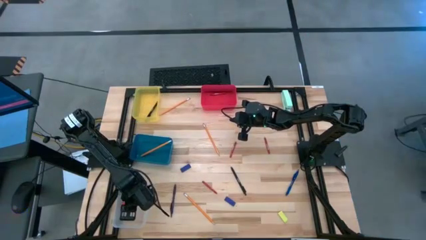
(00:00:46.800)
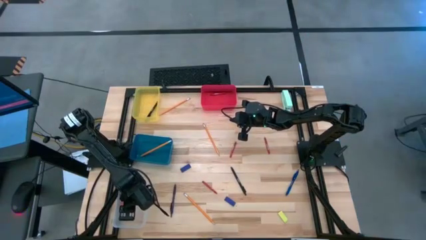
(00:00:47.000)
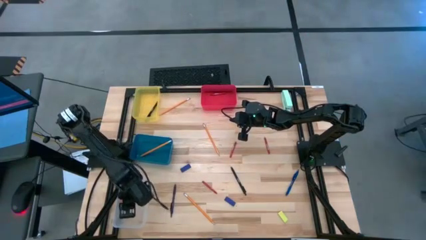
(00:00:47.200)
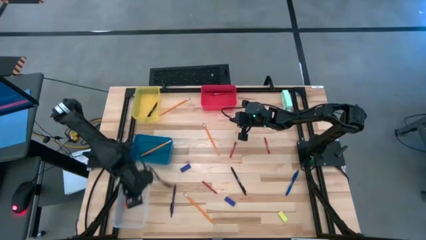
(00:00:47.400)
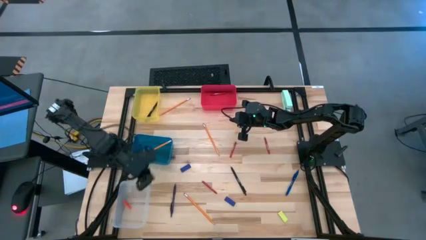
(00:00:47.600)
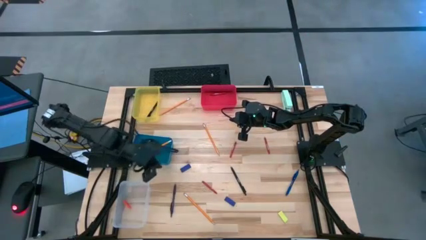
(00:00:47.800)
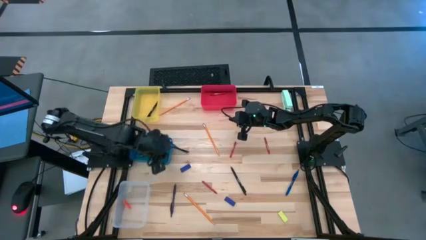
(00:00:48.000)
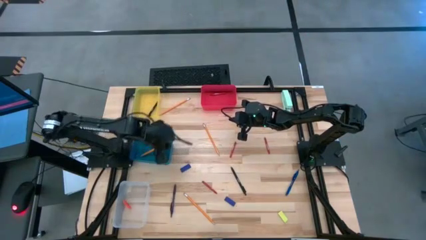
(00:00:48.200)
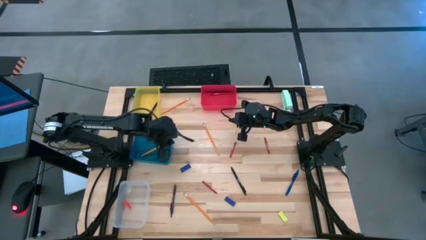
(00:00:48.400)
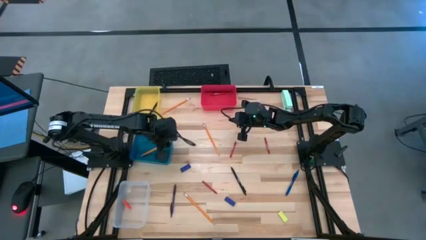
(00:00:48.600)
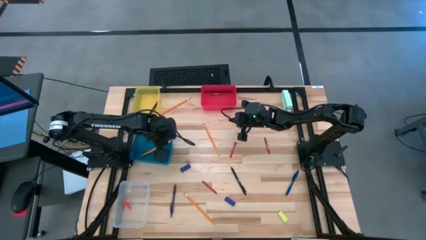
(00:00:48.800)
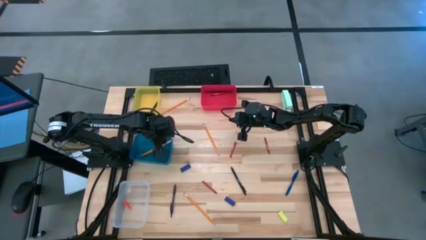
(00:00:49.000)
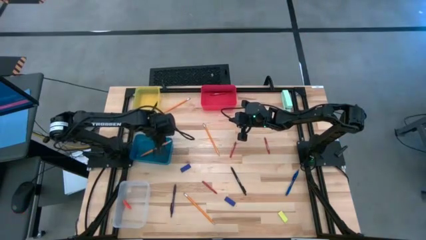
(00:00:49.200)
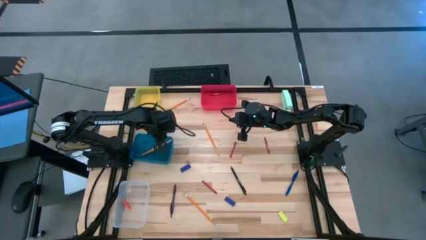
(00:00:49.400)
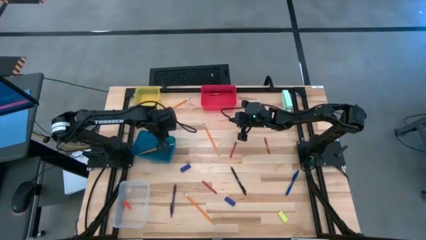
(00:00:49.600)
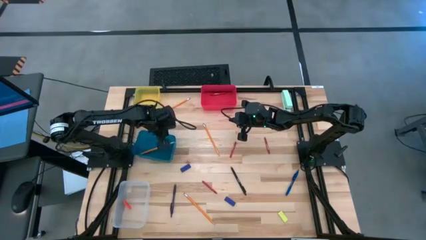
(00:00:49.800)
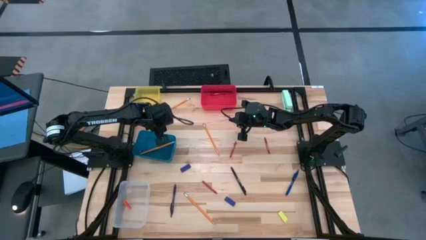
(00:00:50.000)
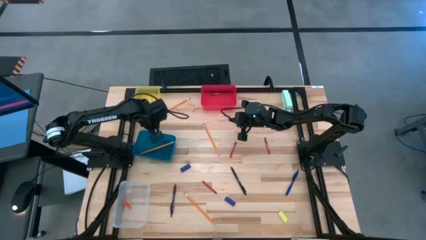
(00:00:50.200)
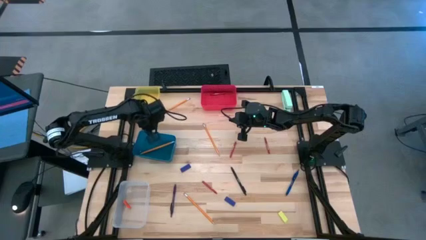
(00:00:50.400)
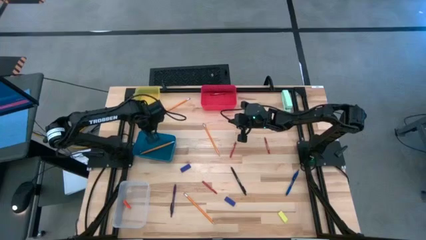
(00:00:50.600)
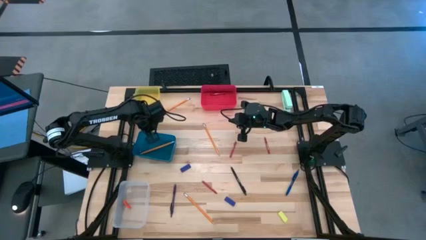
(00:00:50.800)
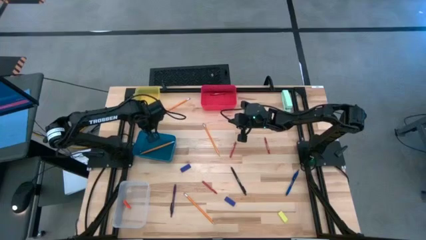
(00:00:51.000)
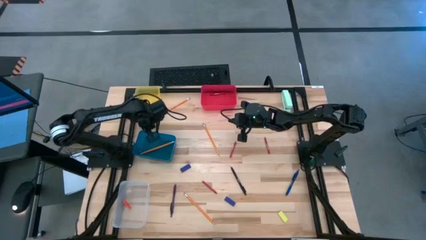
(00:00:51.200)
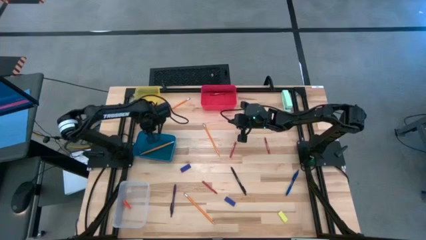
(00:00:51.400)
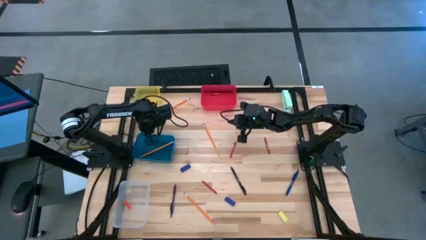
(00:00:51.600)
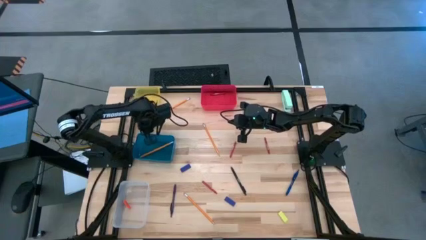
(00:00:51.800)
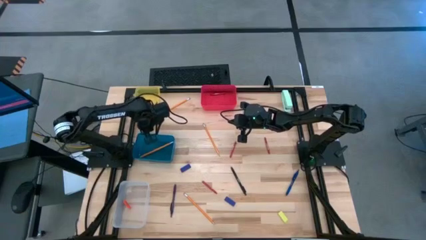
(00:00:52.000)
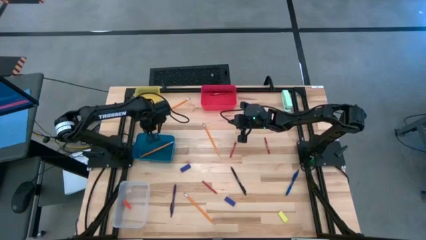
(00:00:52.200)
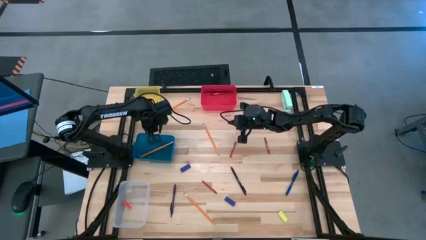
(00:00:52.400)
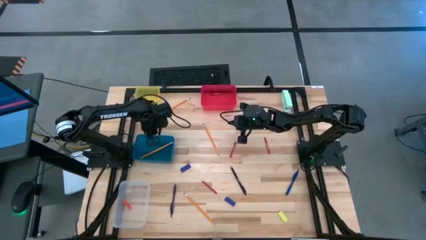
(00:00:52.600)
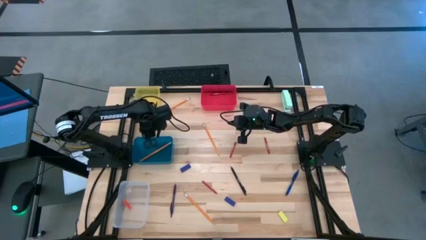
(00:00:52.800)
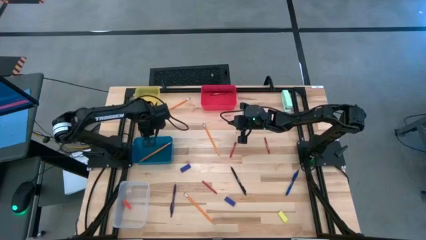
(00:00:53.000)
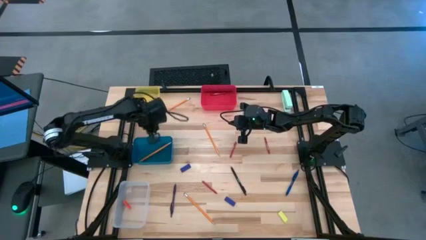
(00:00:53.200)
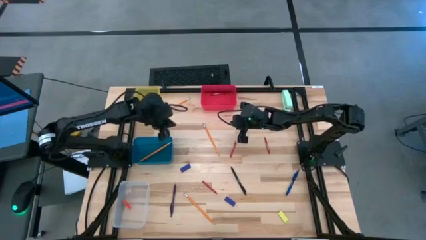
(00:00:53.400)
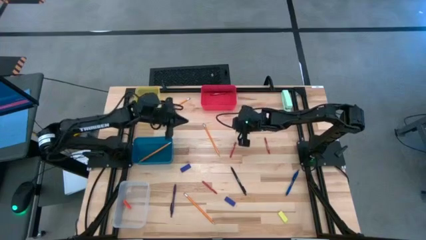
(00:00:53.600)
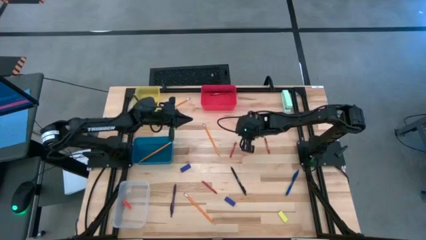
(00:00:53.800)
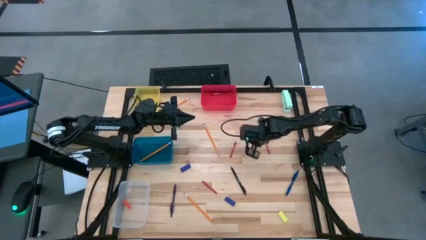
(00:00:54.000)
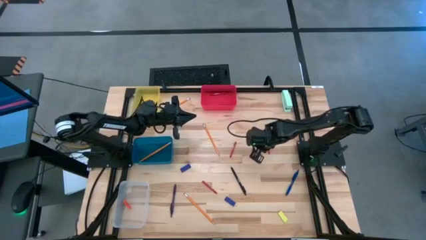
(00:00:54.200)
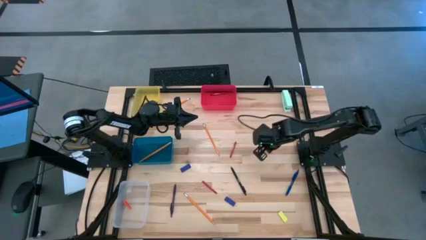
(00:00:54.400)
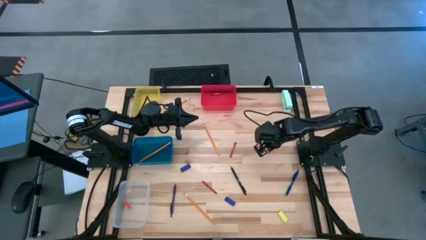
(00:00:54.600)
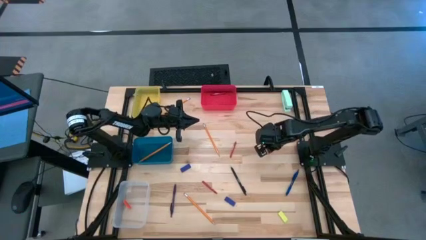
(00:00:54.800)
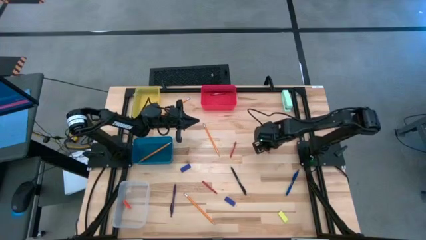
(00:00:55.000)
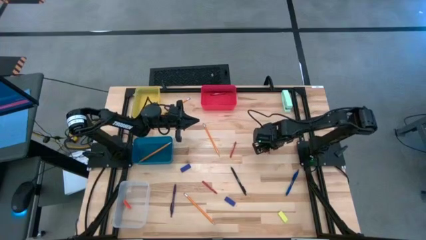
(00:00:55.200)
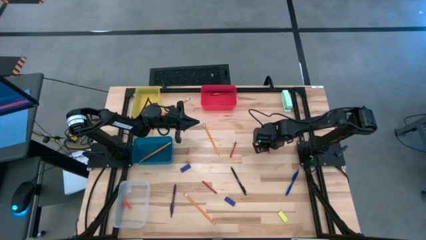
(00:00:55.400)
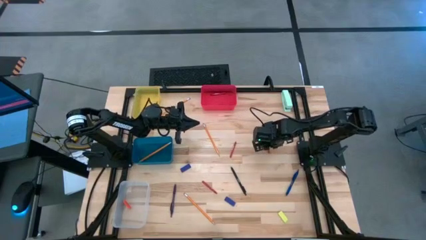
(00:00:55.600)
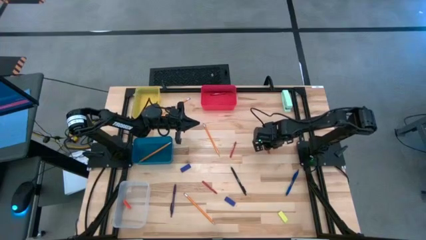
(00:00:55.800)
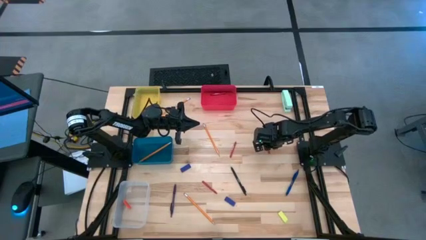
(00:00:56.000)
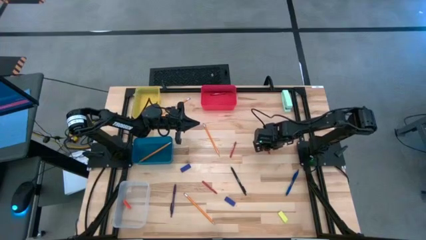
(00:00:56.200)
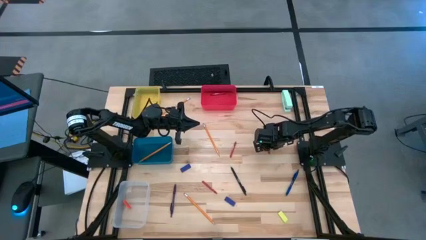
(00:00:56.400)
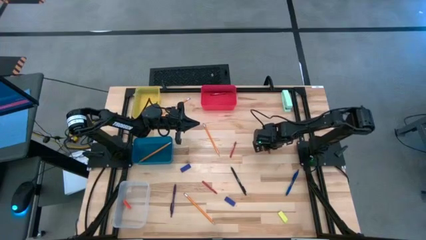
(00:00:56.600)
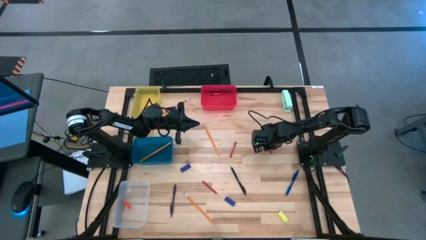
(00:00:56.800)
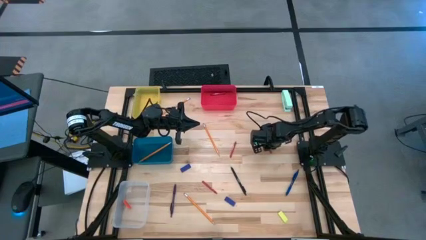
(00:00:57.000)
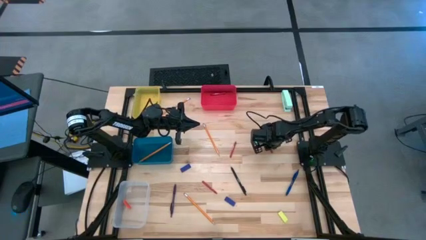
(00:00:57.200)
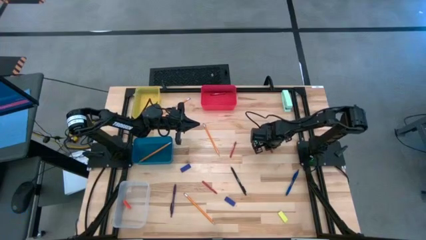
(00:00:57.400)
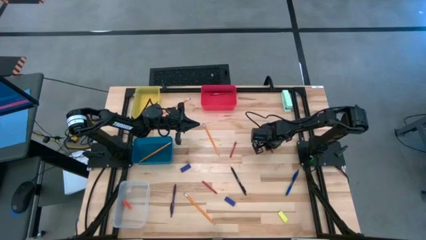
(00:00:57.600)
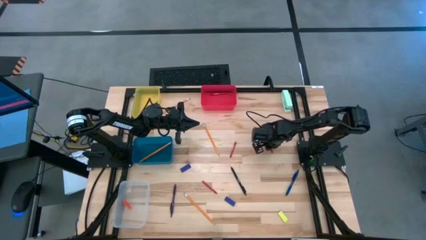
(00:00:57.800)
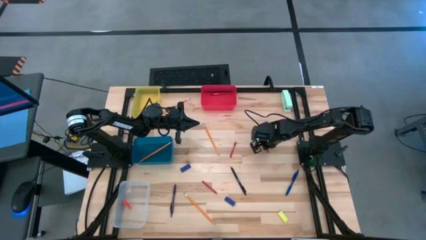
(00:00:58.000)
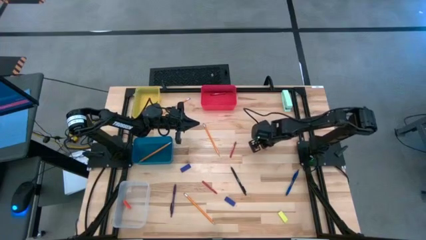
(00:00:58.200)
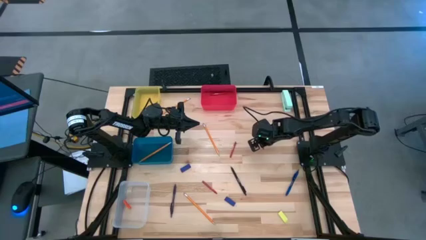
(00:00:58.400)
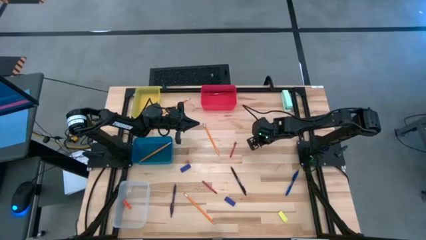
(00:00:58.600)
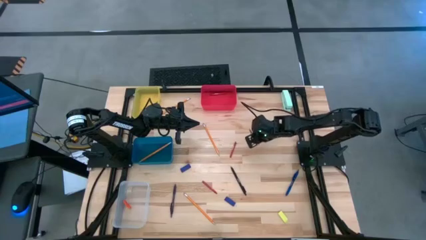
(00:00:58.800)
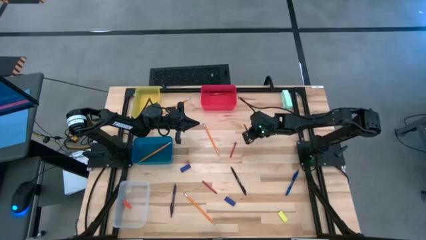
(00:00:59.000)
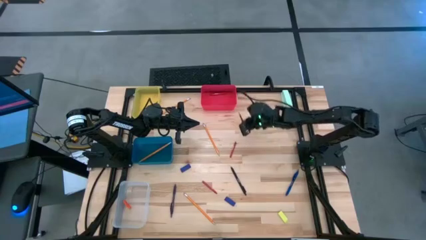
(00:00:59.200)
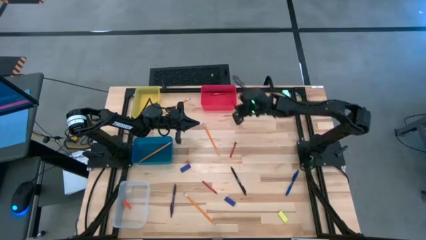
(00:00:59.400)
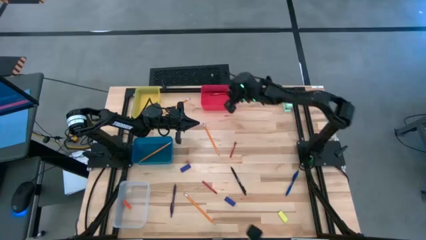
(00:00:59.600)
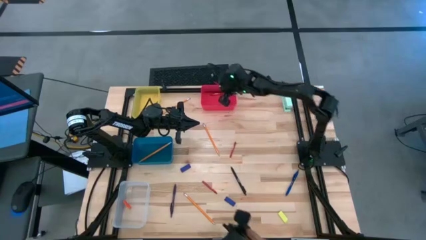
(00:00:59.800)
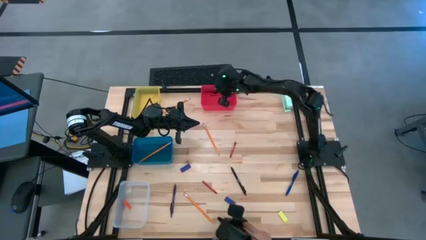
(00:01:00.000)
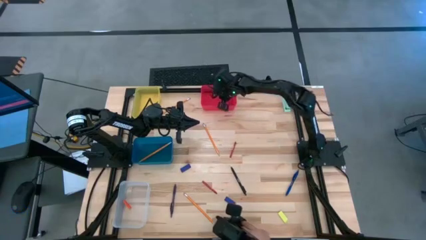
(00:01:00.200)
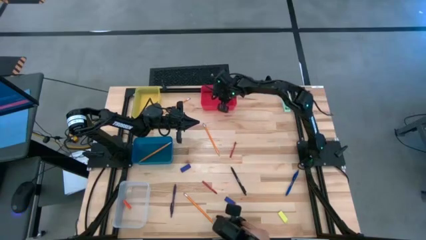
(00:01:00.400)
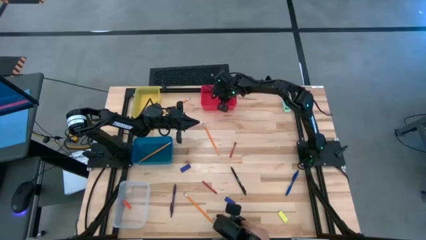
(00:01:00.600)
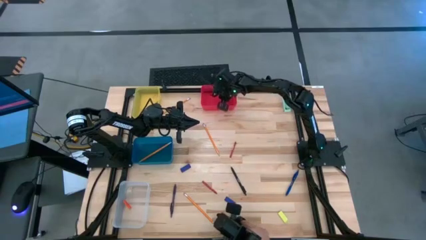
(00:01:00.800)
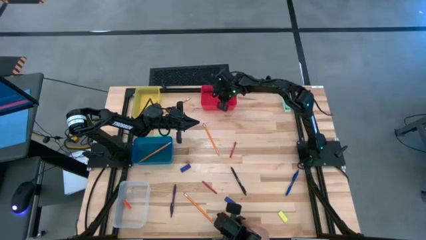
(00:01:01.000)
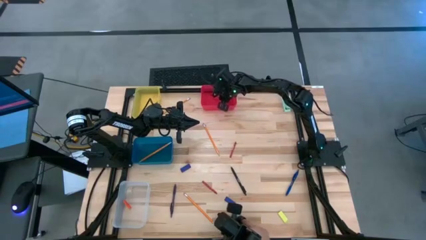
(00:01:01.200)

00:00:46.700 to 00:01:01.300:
Task: Sort crayons/erasers/pens/pencils in bins
Put the red crayon into the red bin

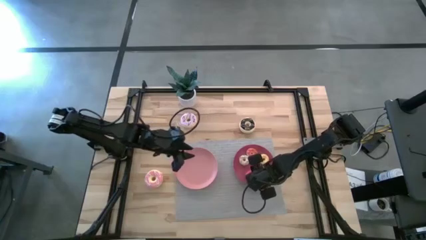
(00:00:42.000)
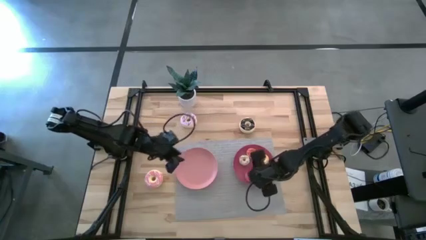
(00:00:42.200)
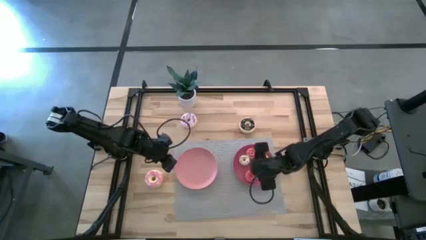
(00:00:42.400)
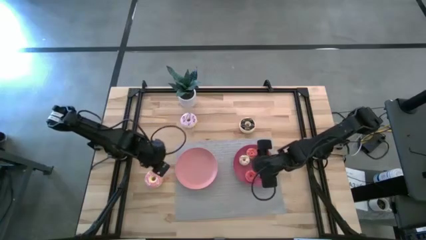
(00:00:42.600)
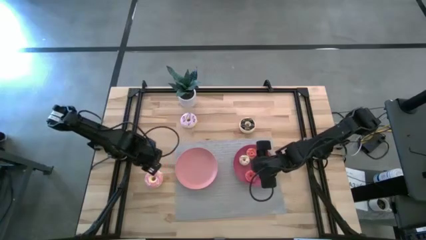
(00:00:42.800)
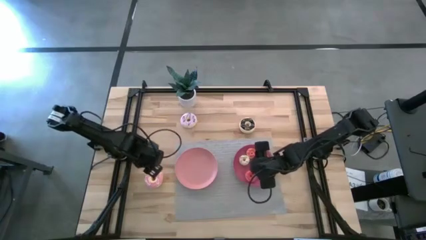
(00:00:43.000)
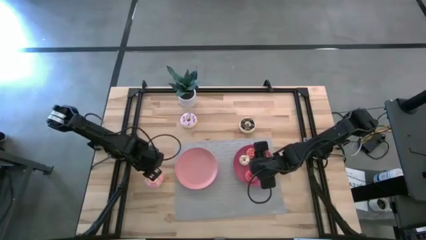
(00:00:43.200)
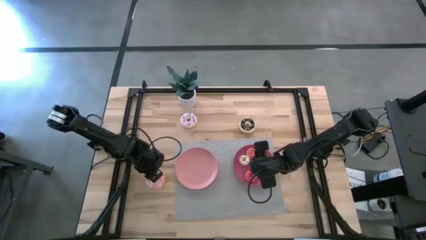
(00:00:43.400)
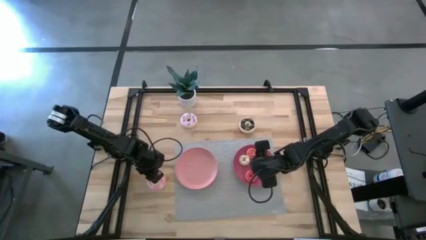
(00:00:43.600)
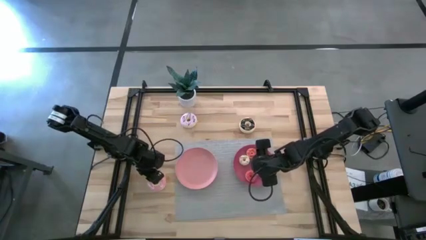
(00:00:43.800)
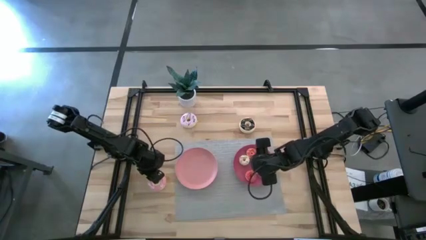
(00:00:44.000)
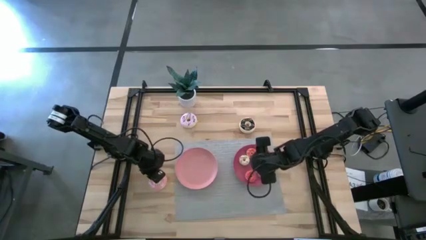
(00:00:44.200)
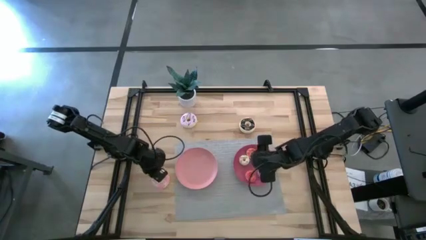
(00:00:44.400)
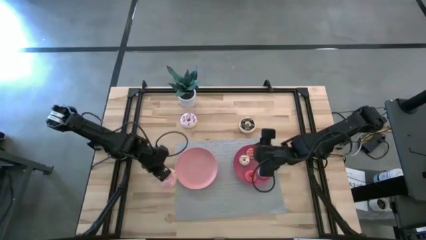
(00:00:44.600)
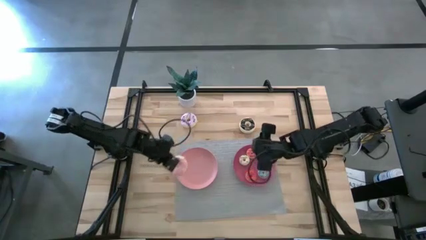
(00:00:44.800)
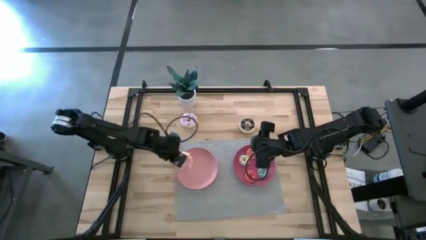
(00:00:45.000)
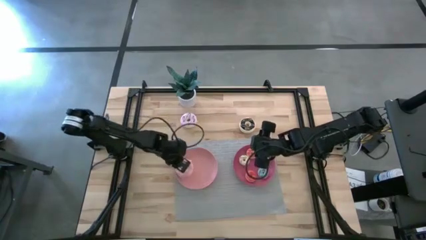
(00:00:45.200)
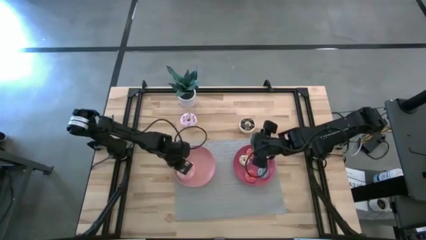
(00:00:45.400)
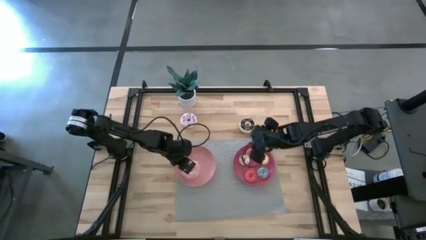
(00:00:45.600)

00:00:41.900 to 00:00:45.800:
Task: Pick & Place donuts
Put the large pink donut on the light pink plate
